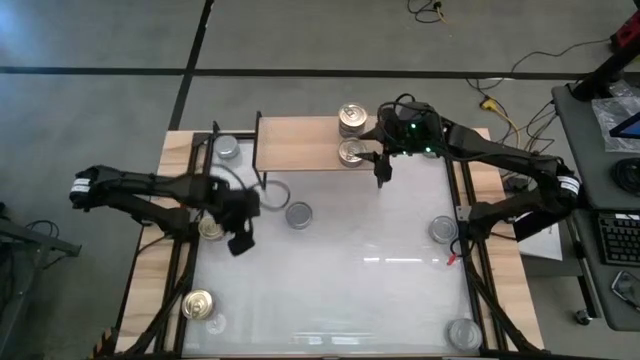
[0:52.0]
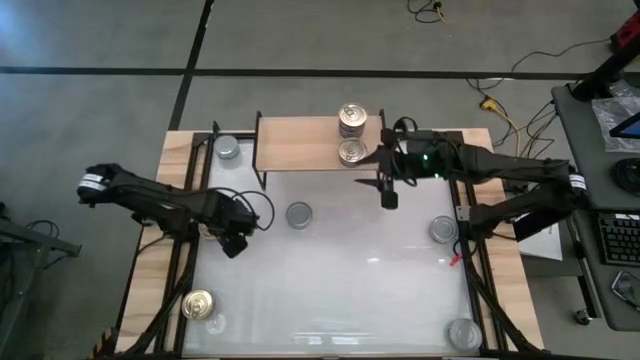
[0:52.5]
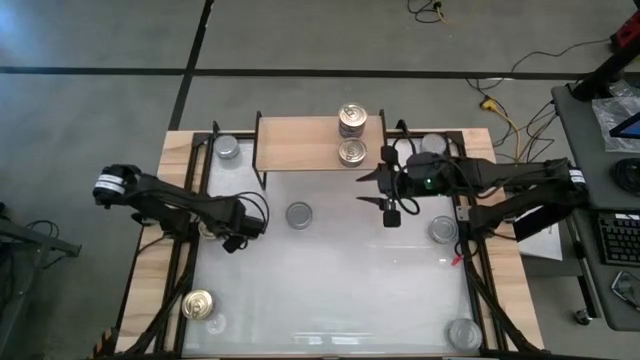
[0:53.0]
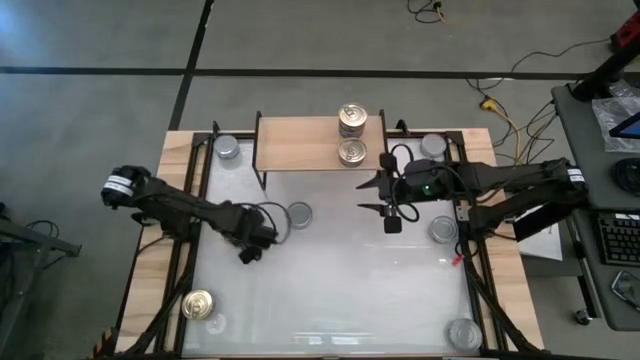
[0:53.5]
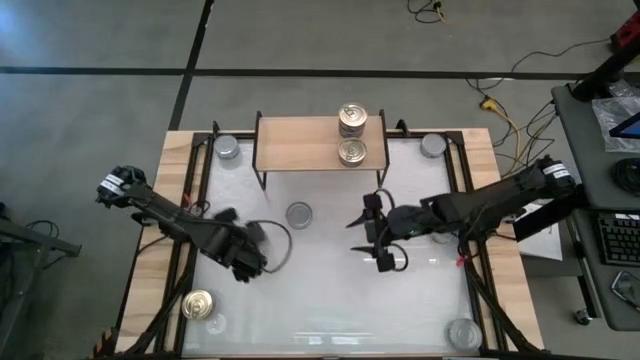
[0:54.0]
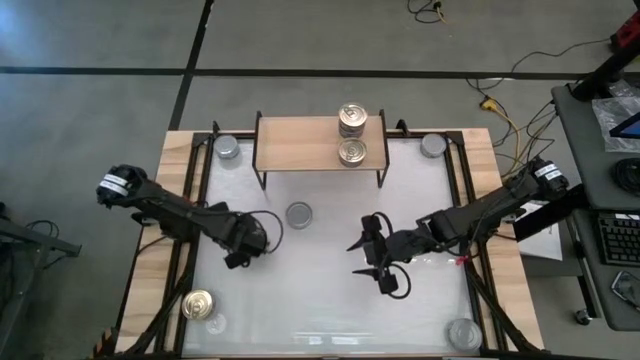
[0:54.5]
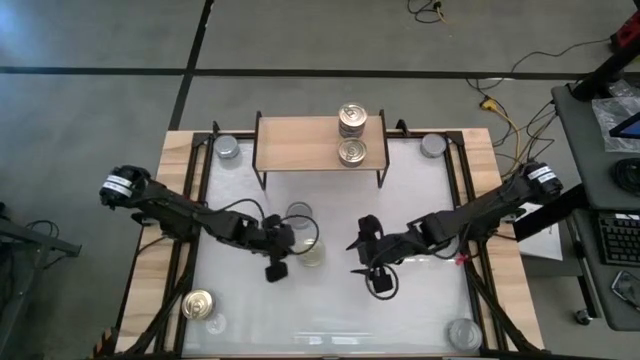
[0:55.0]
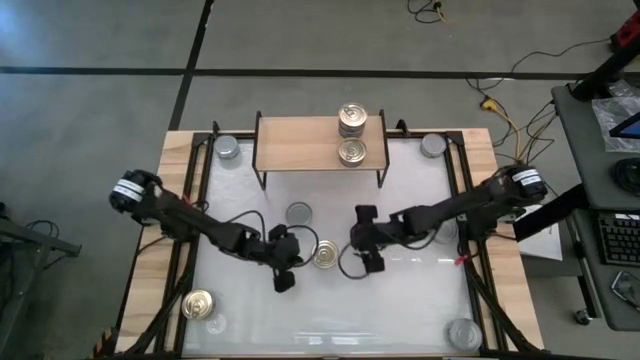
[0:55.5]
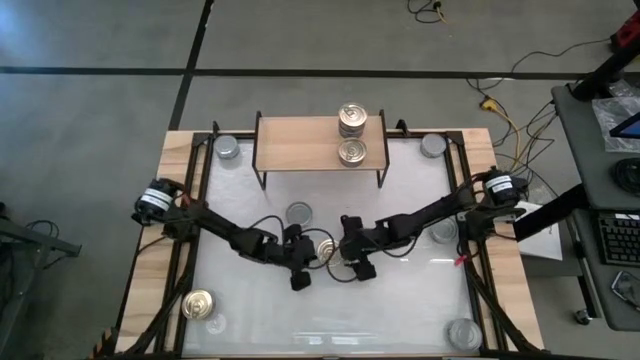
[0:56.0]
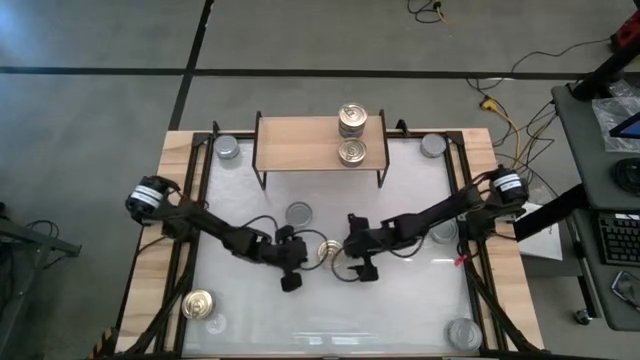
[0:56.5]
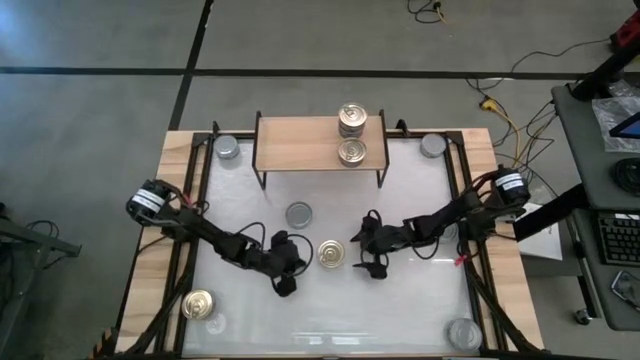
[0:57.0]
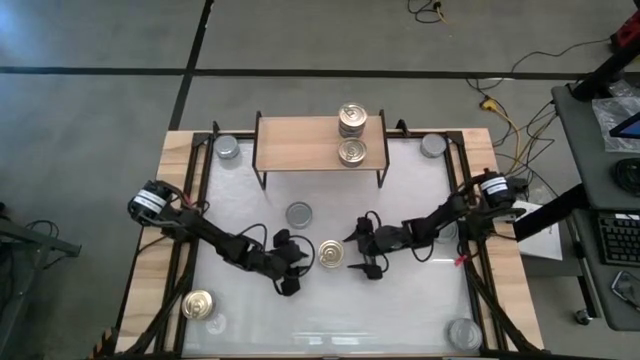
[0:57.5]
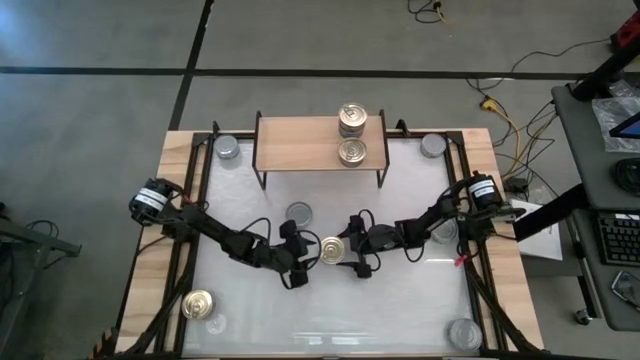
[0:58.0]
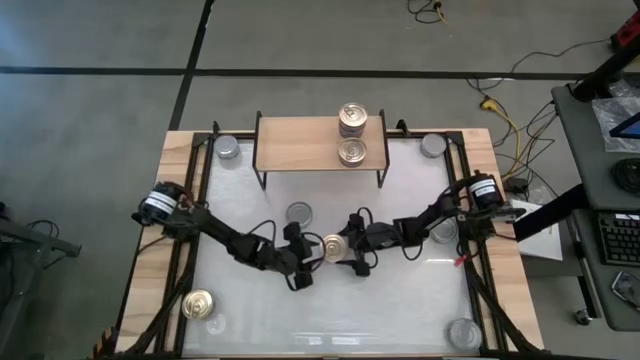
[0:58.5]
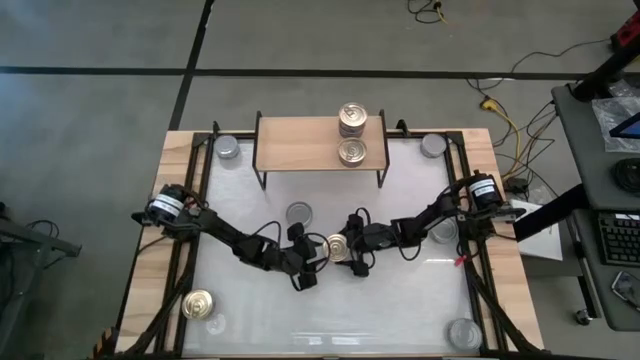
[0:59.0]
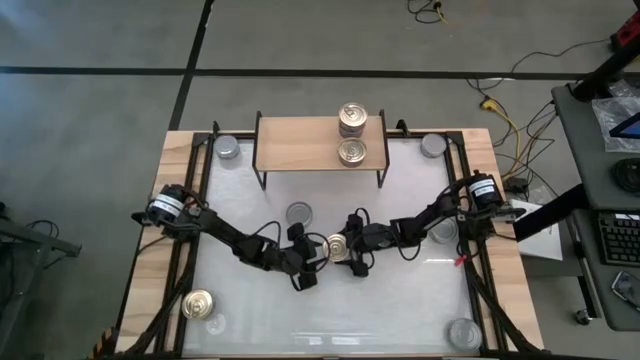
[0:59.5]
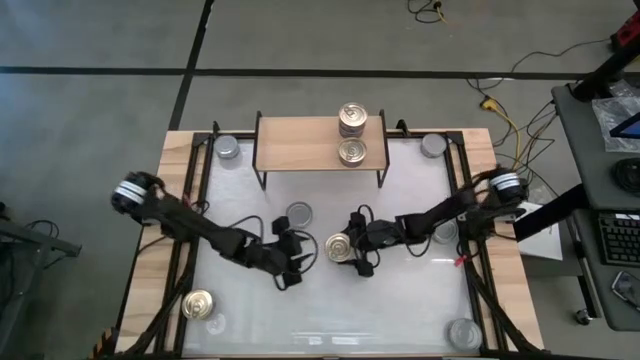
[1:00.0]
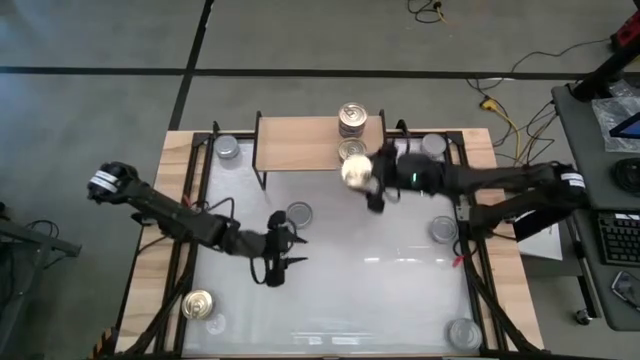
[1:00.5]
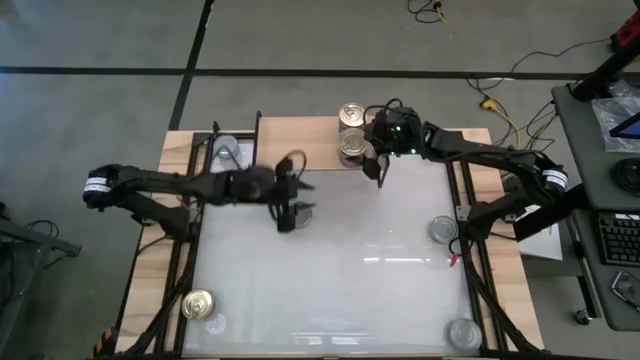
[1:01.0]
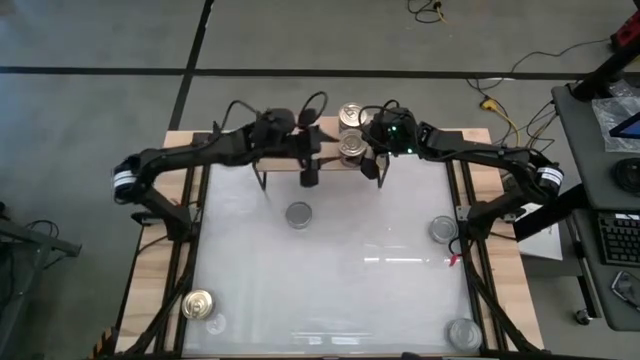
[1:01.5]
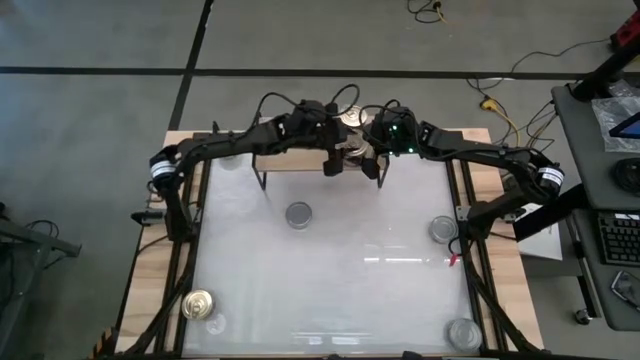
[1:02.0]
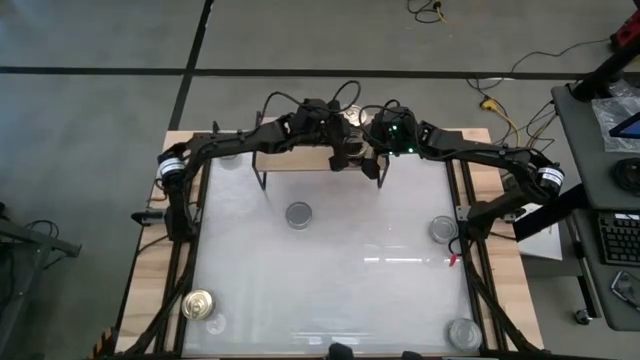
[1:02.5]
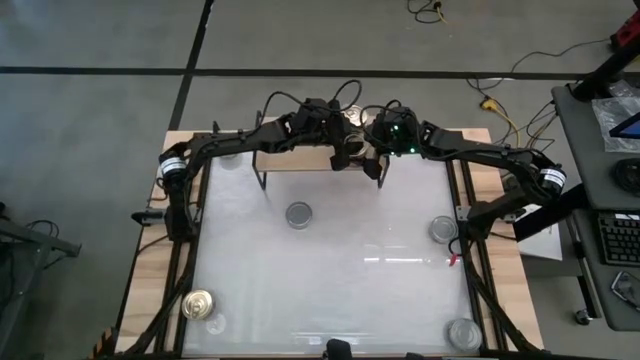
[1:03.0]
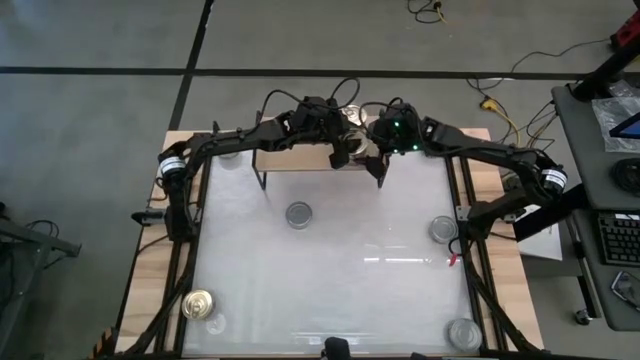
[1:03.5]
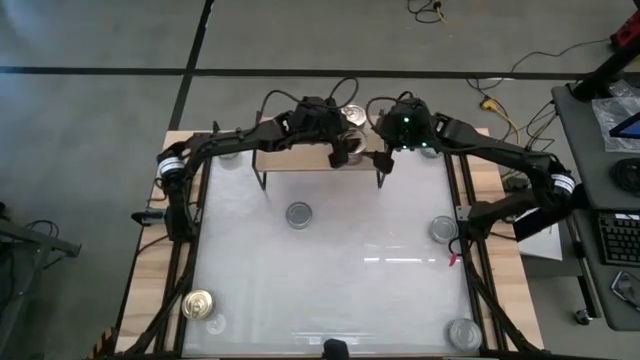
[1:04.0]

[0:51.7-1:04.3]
Task: Stack canned seafood by type on shelf
Stack the blue-pink tuna can on top of the other blue-pink tuna can on the shelf

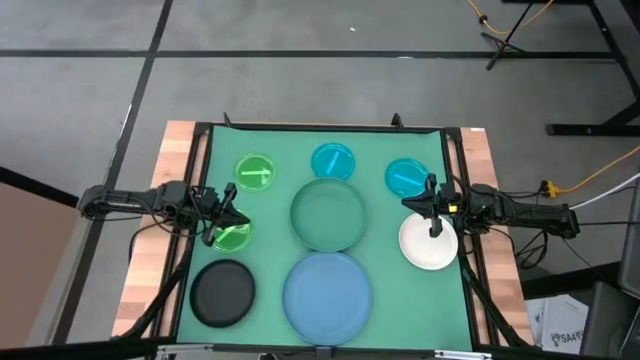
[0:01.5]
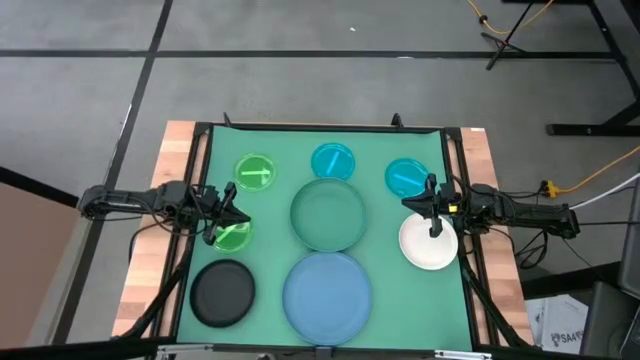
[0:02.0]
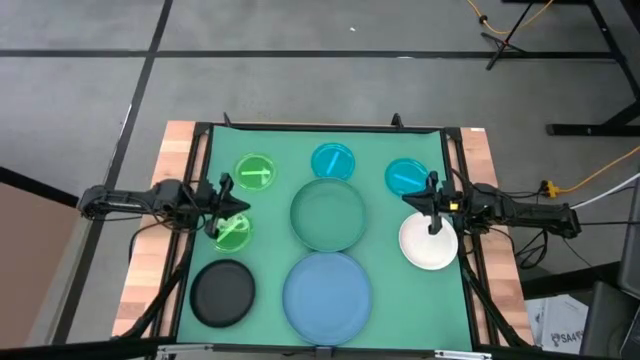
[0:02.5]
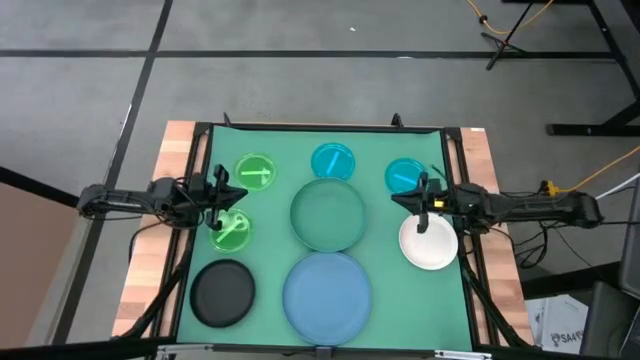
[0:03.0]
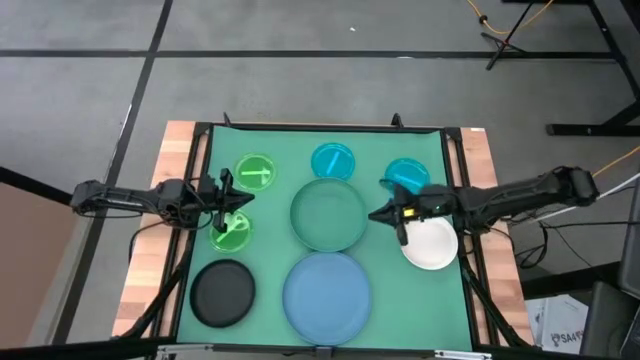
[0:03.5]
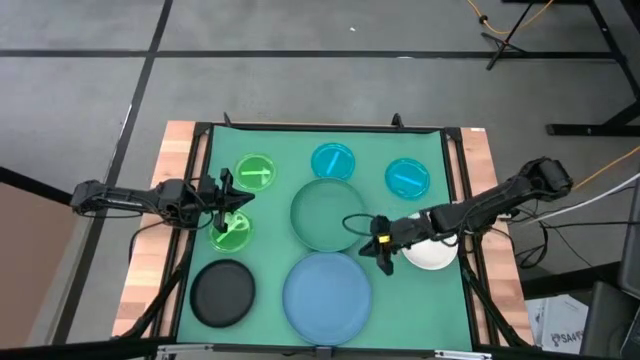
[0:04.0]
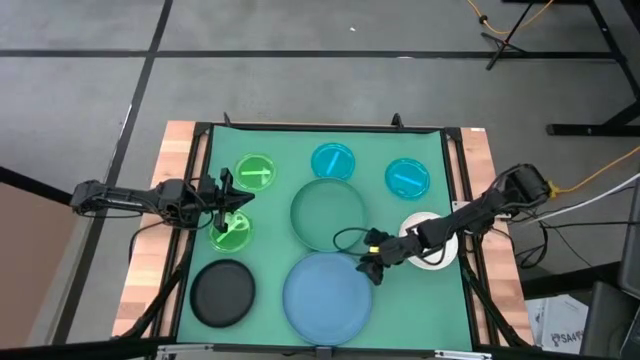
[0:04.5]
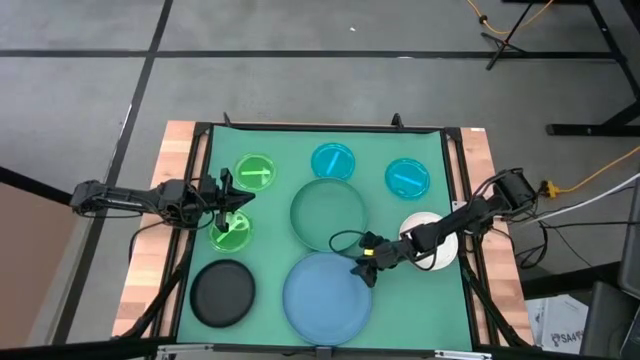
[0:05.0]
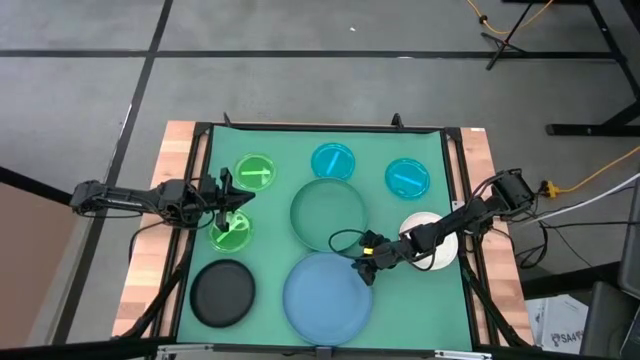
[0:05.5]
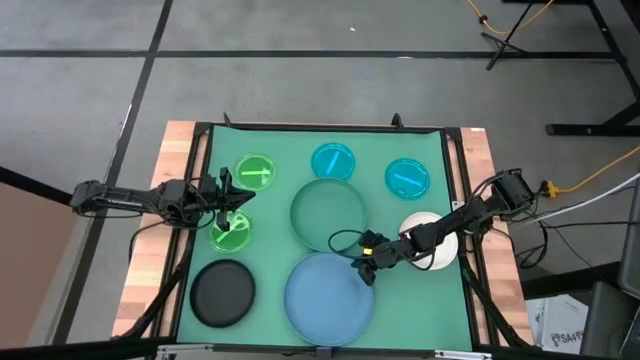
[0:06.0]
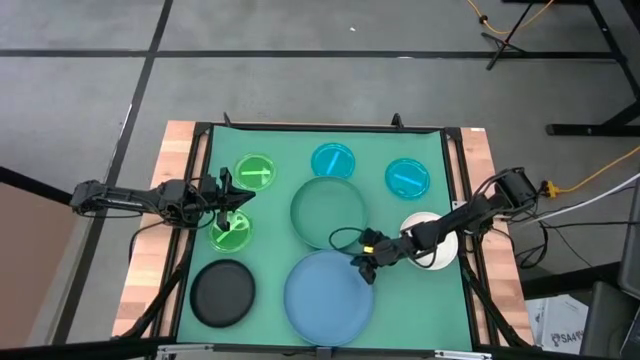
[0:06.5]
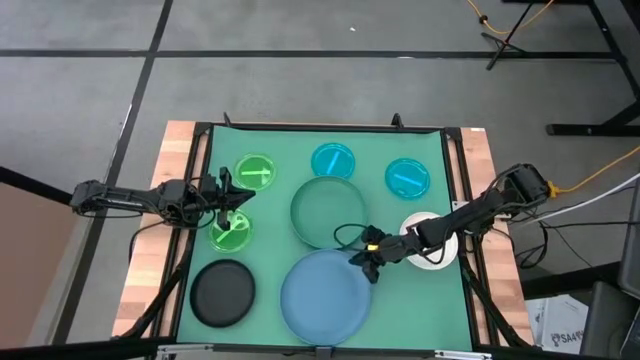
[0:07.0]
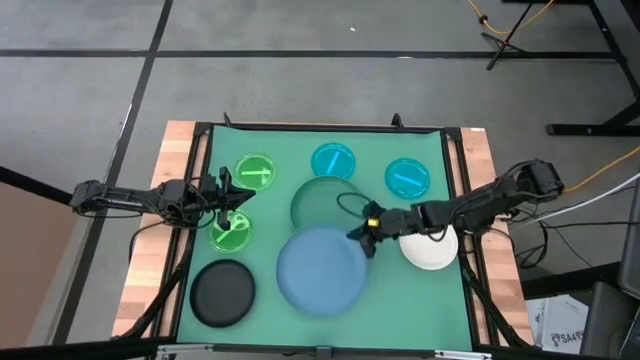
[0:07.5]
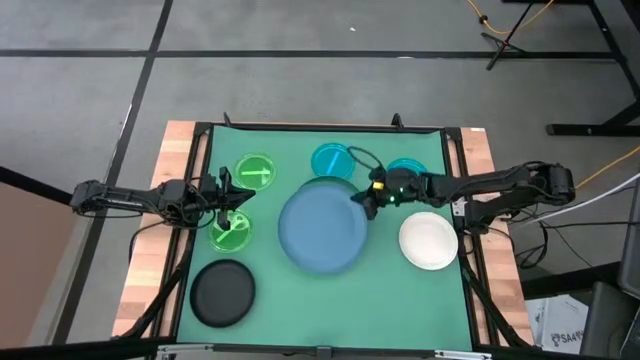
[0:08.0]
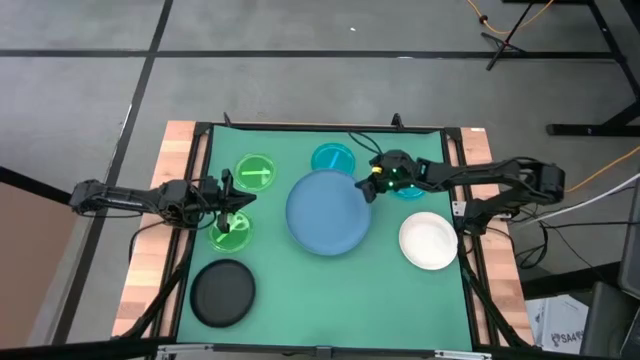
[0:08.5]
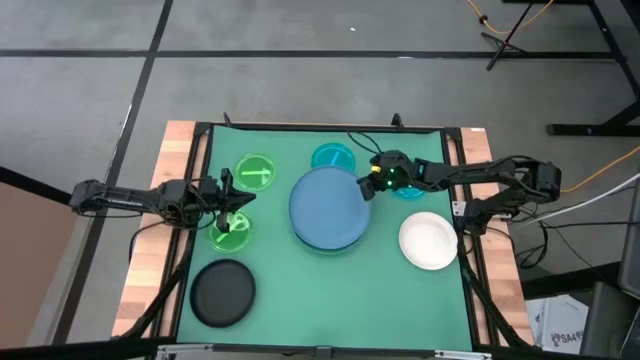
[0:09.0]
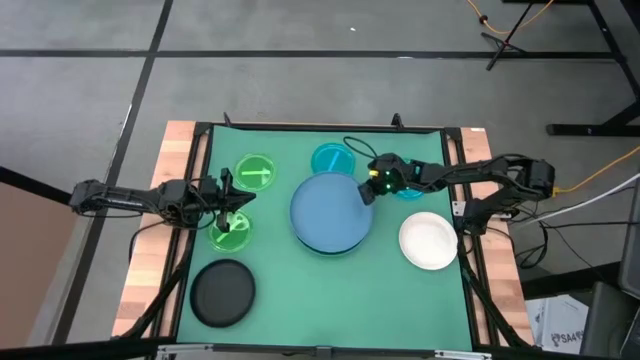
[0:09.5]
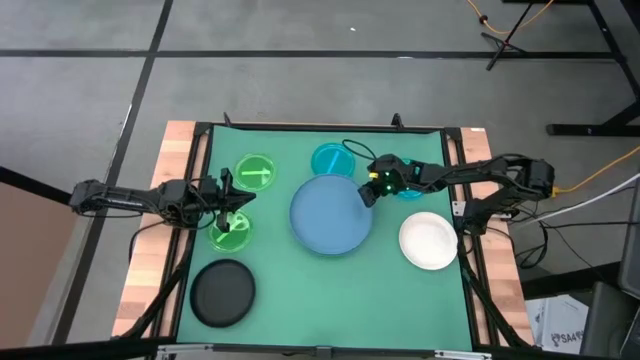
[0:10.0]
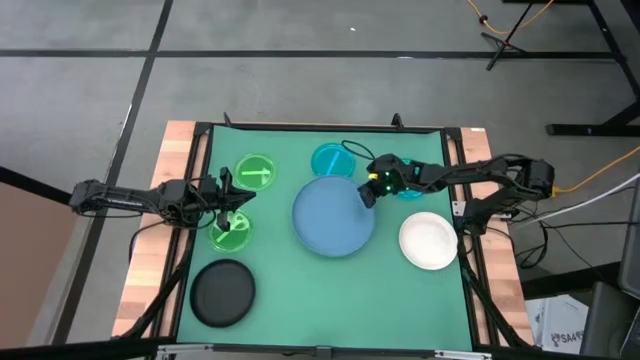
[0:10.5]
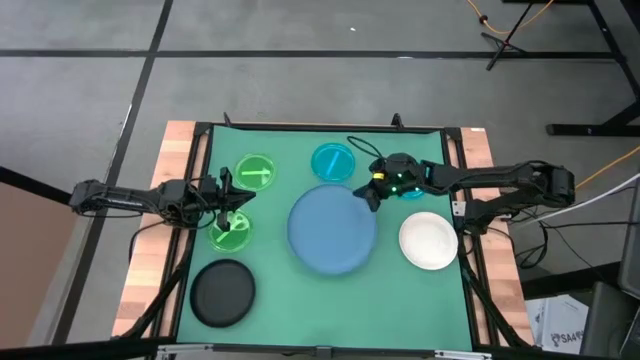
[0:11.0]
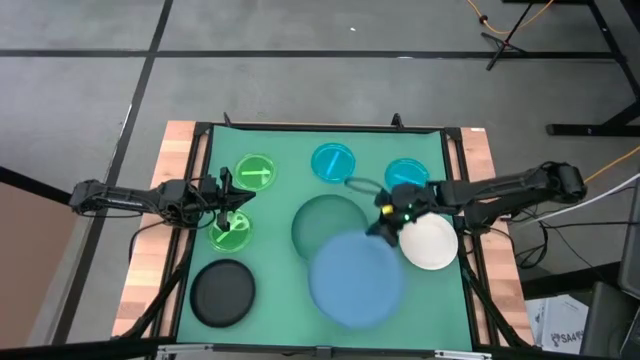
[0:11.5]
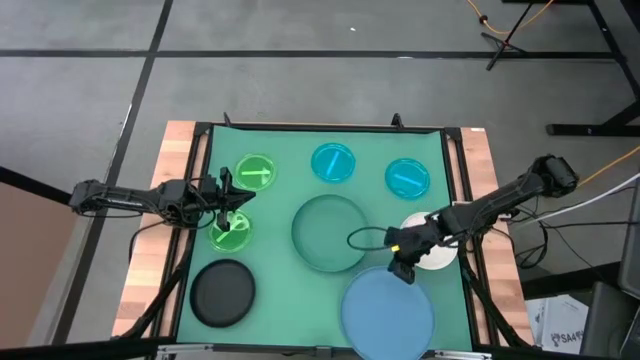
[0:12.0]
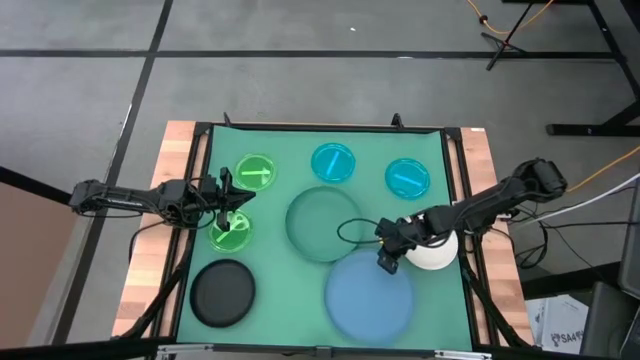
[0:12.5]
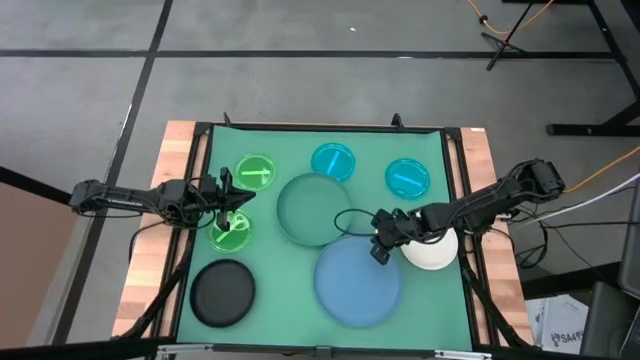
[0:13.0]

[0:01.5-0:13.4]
Task: Stack plastic plates
Stack the blue plate on the green plate
